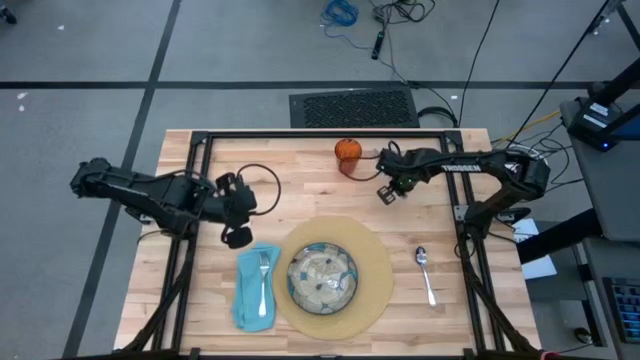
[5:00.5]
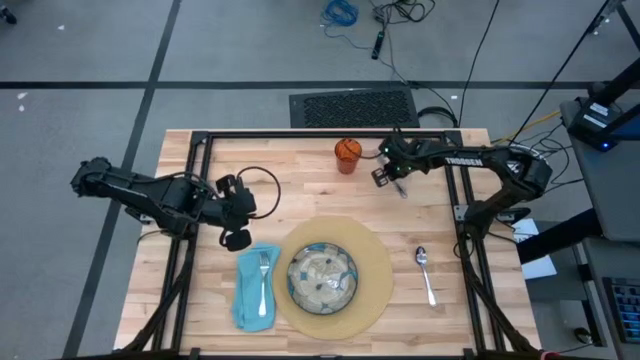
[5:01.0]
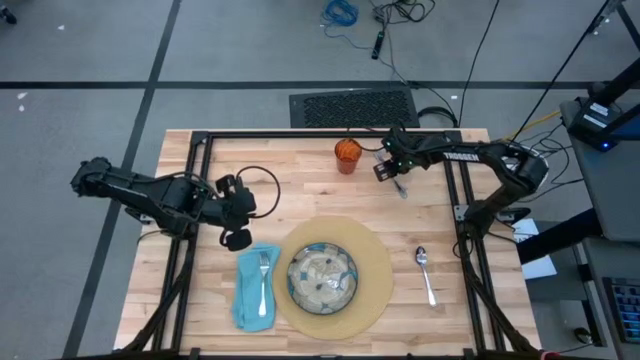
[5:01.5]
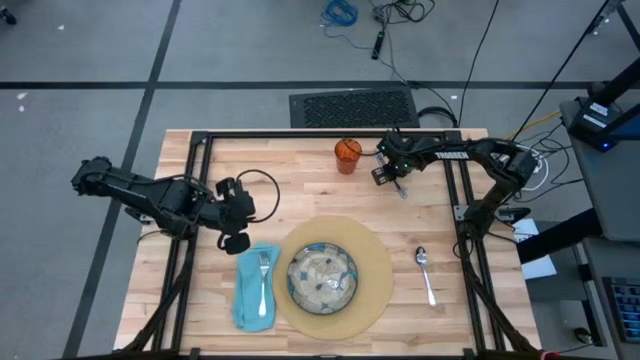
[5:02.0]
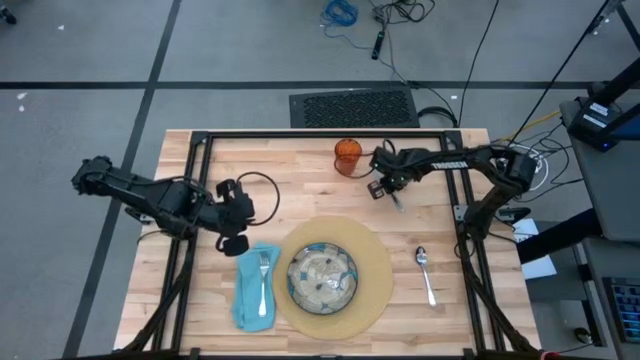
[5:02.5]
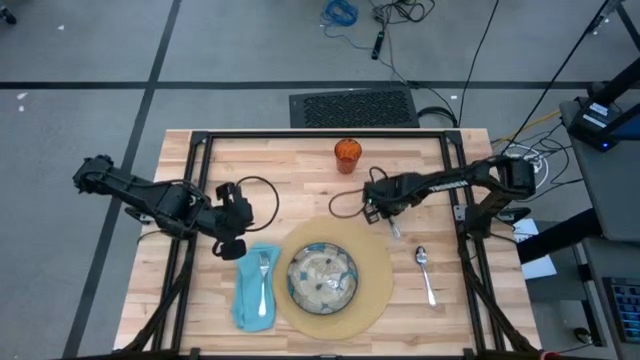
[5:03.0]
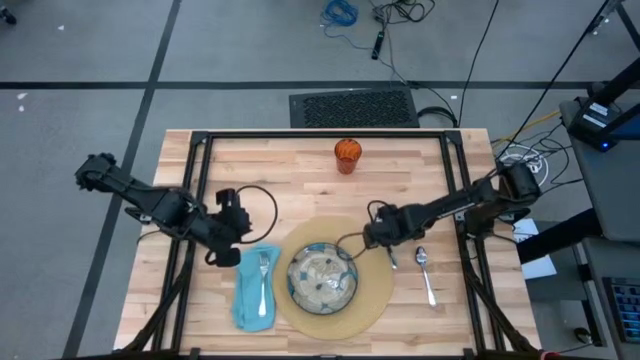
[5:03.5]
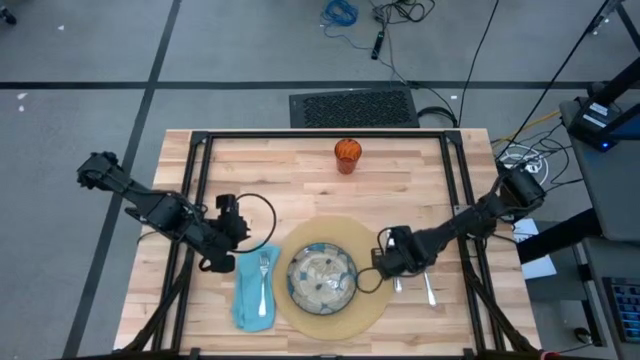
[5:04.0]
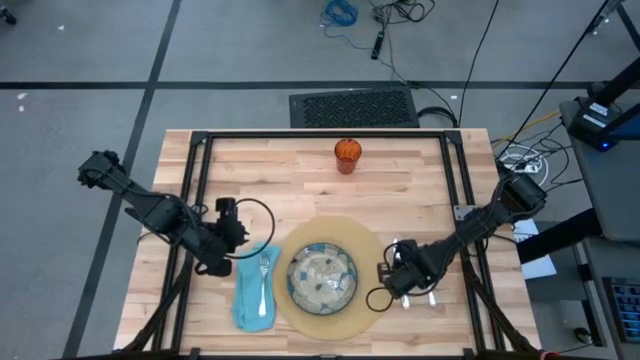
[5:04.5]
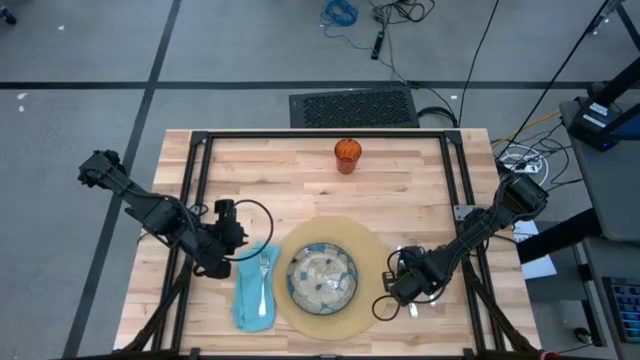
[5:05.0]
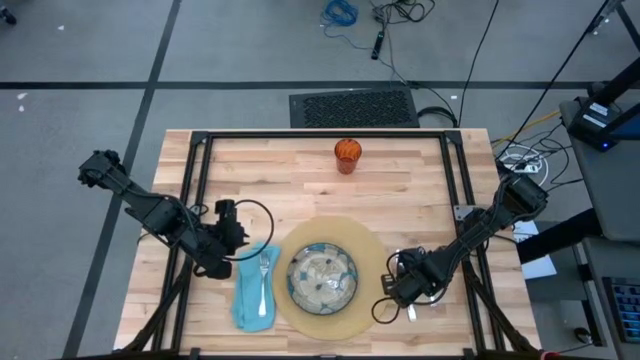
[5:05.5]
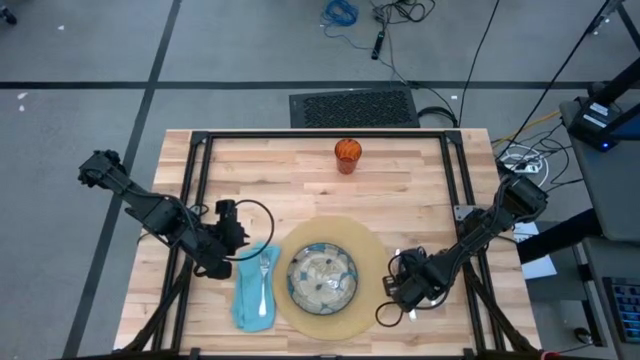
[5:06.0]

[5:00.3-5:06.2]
Task: Set table place
Move the silver knife to the left side of the silver spoon

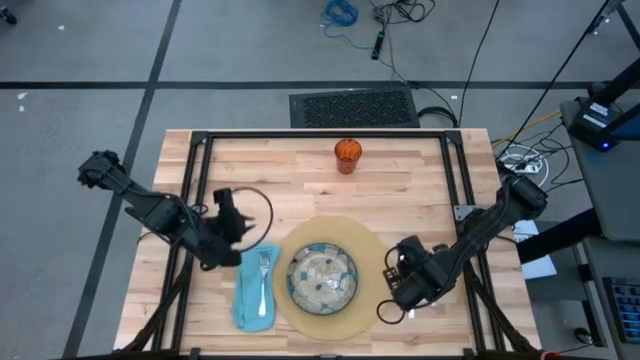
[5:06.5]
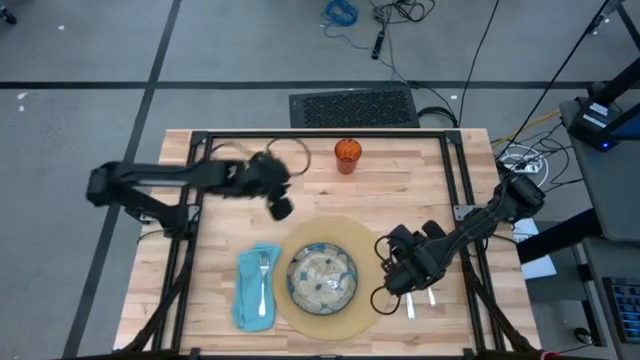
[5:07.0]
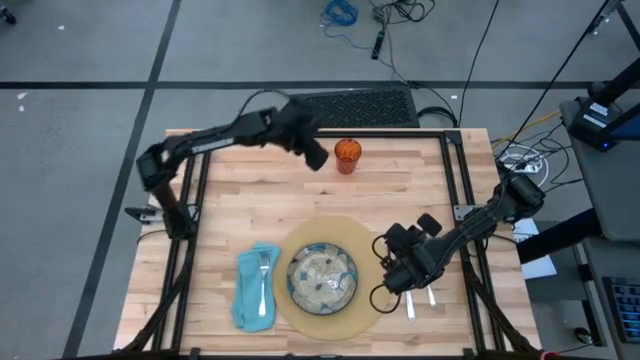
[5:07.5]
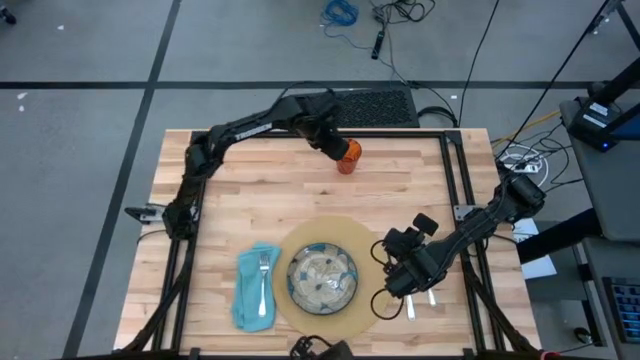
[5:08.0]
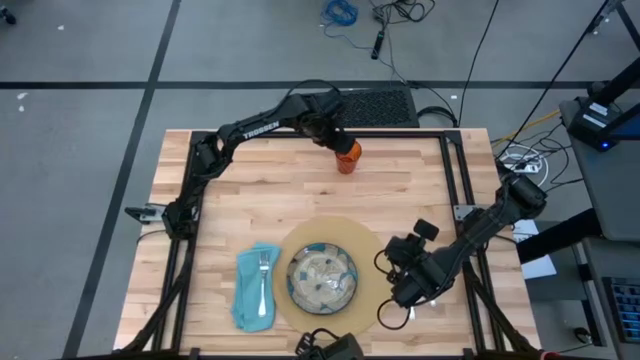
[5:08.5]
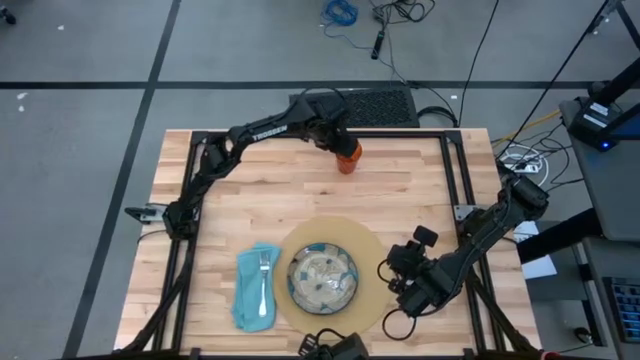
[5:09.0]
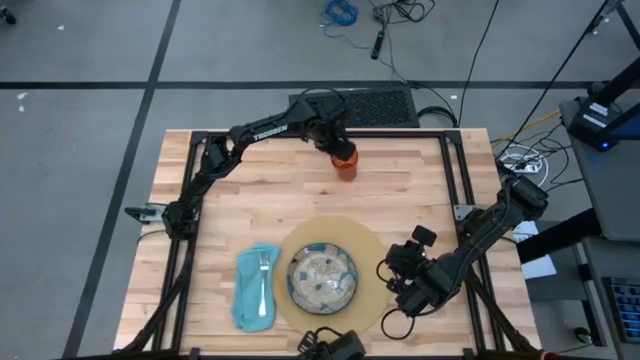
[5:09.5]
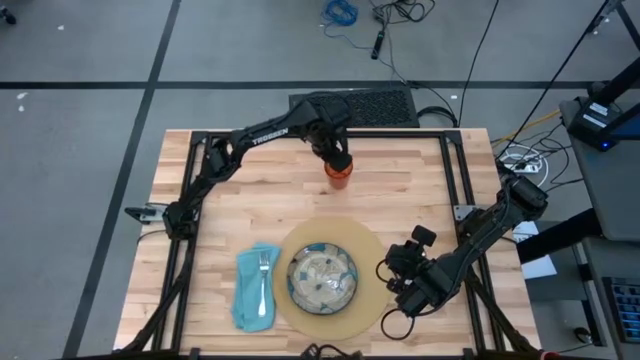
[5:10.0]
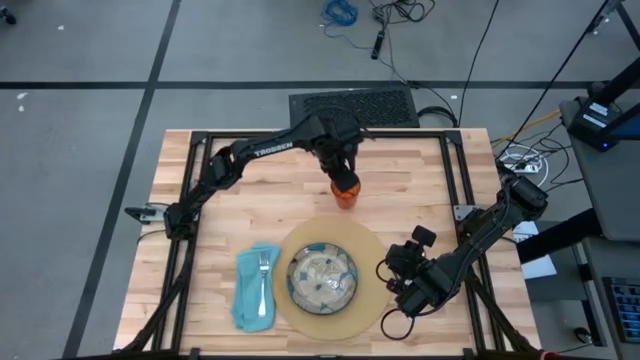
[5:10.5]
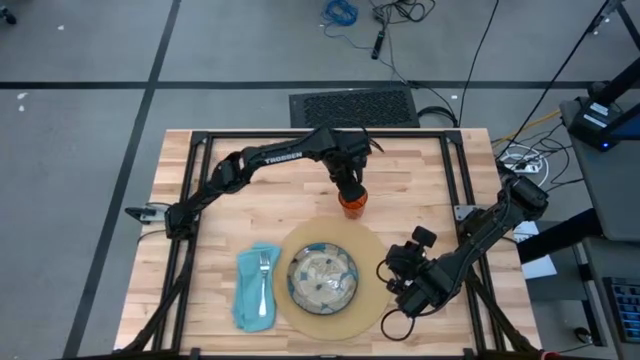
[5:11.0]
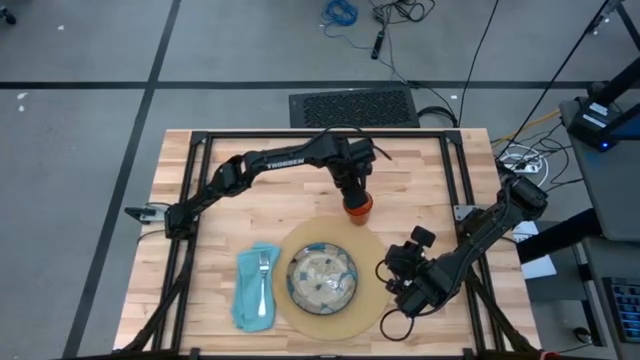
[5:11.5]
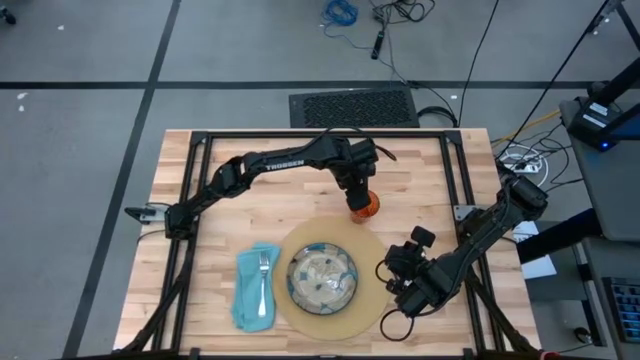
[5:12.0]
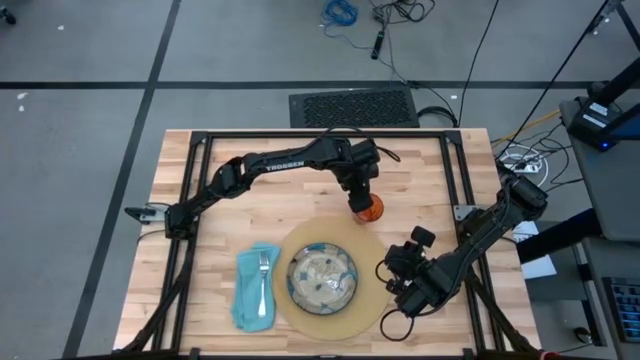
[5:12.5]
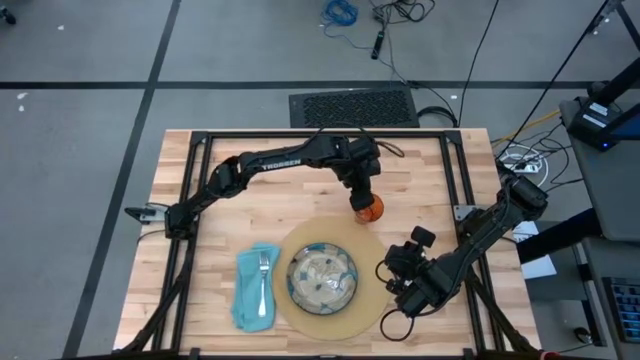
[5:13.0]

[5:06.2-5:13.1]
Move the dark brown glass to the top right of the brown mat
